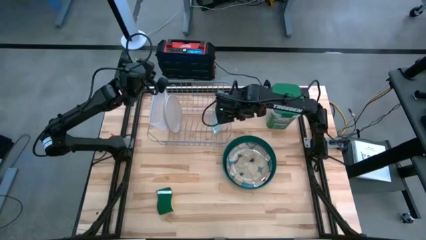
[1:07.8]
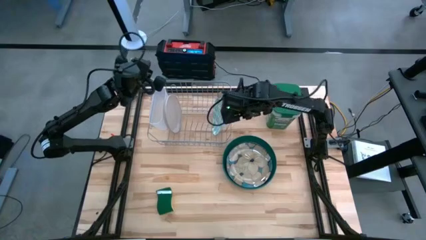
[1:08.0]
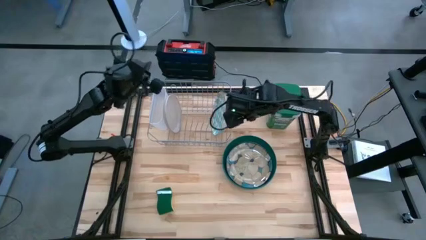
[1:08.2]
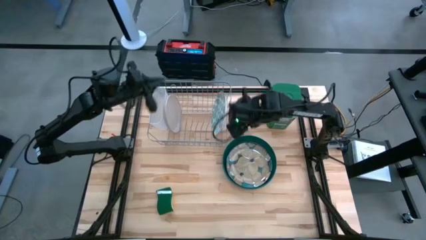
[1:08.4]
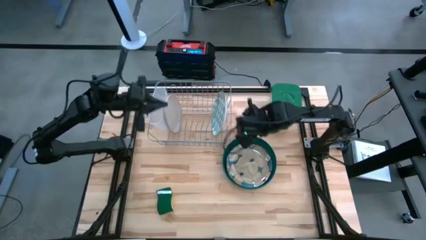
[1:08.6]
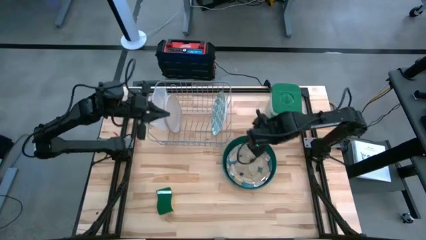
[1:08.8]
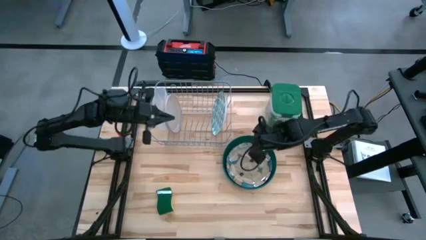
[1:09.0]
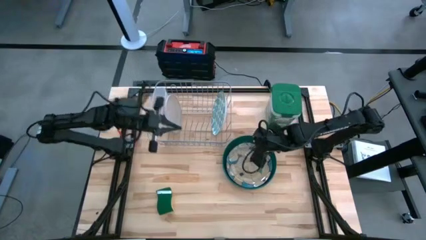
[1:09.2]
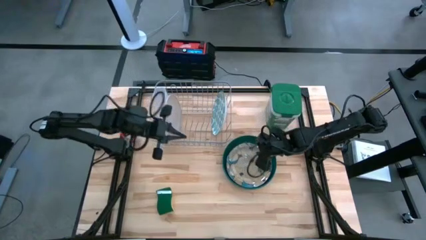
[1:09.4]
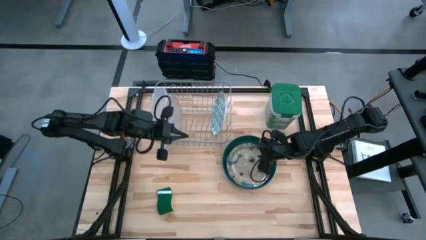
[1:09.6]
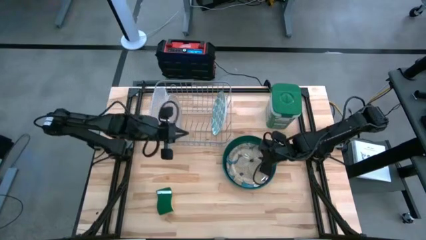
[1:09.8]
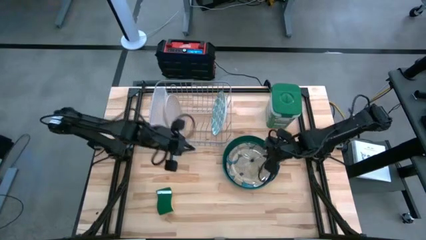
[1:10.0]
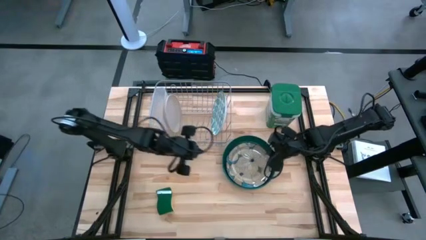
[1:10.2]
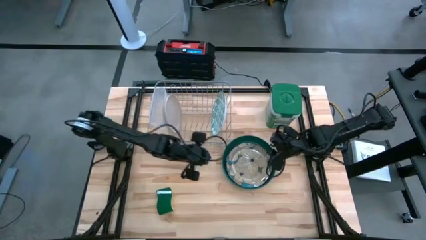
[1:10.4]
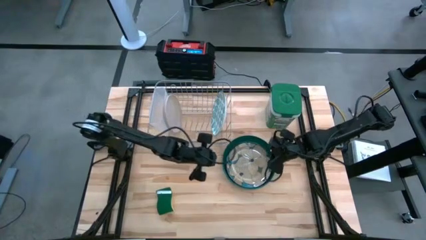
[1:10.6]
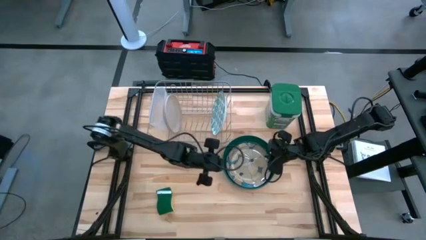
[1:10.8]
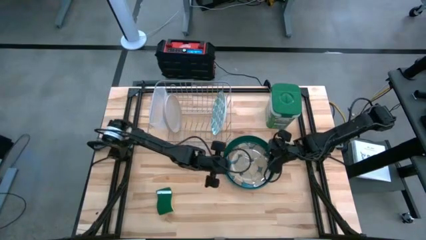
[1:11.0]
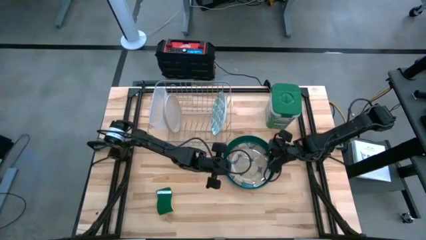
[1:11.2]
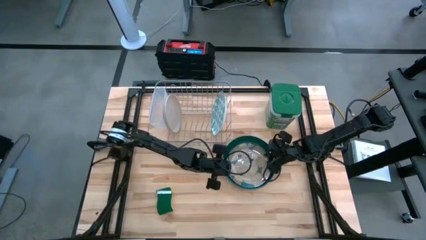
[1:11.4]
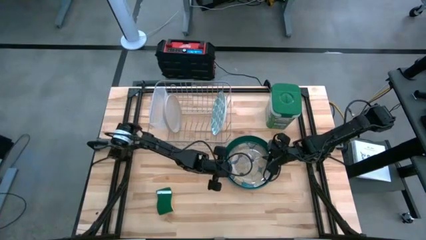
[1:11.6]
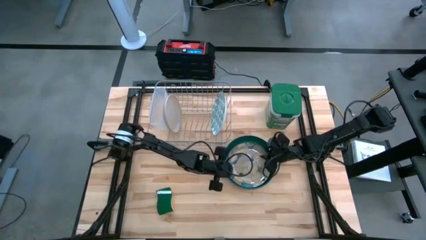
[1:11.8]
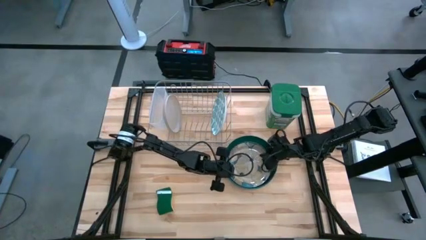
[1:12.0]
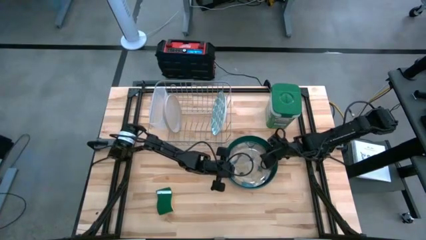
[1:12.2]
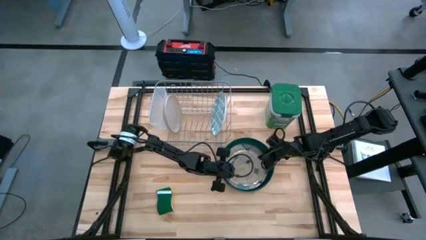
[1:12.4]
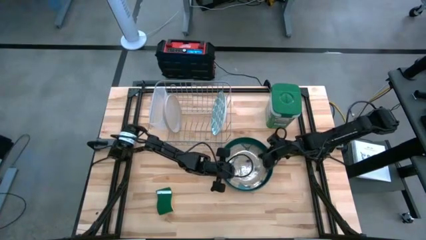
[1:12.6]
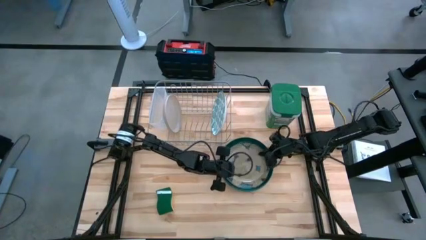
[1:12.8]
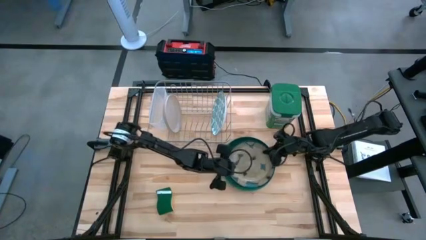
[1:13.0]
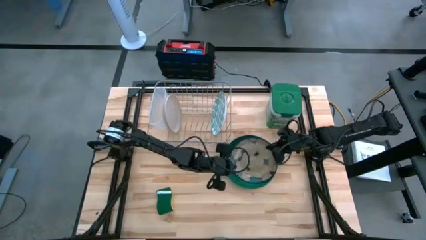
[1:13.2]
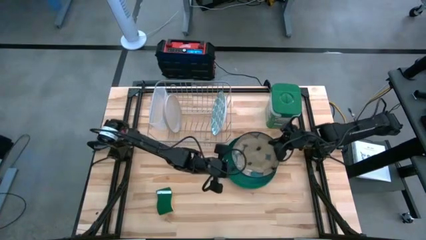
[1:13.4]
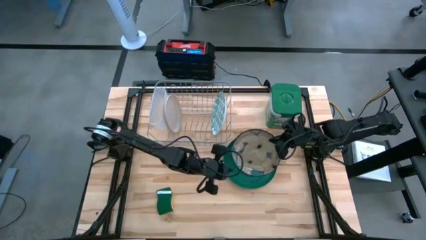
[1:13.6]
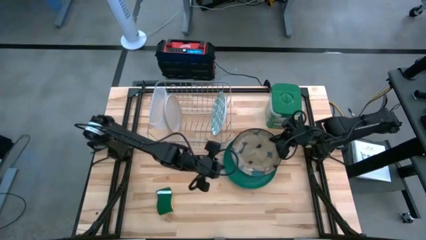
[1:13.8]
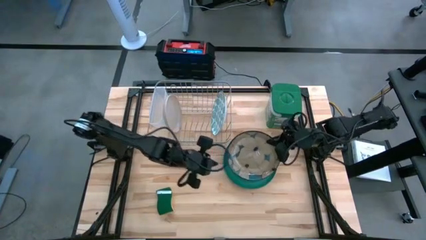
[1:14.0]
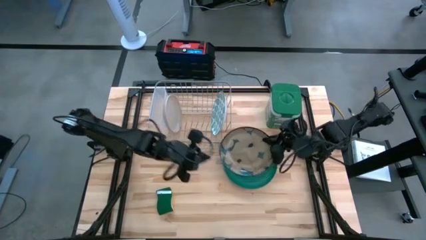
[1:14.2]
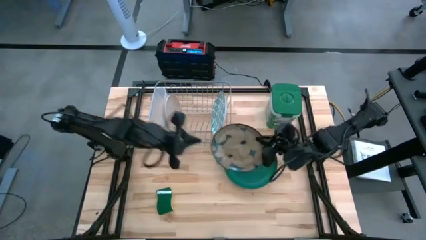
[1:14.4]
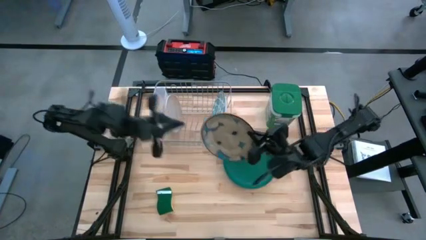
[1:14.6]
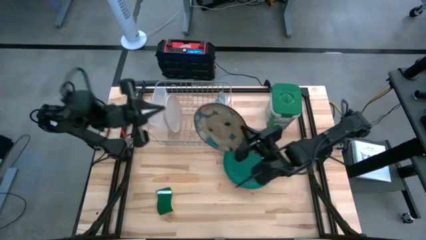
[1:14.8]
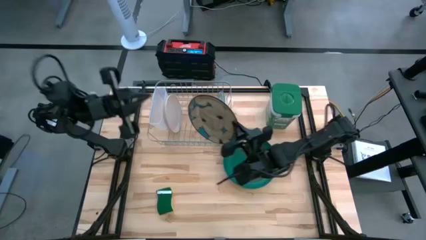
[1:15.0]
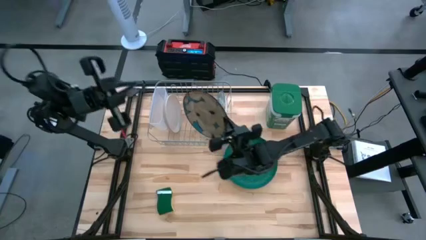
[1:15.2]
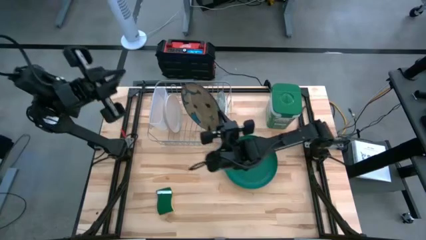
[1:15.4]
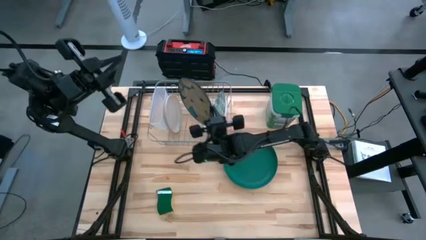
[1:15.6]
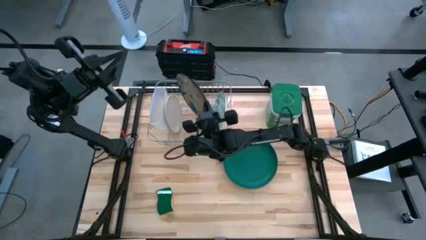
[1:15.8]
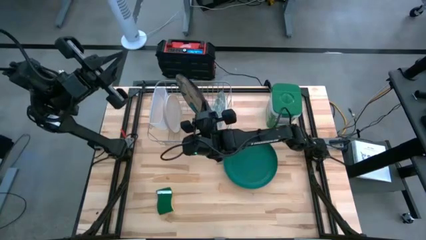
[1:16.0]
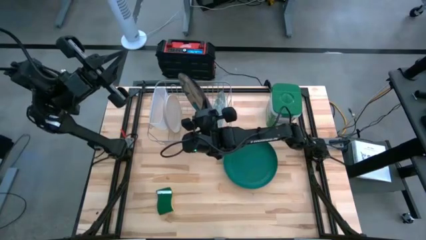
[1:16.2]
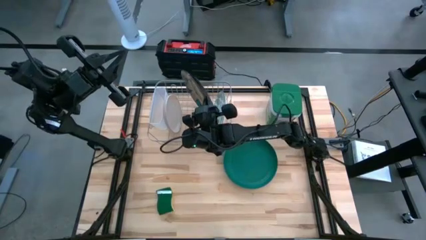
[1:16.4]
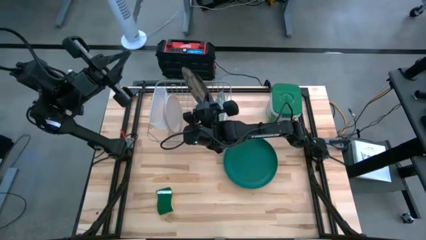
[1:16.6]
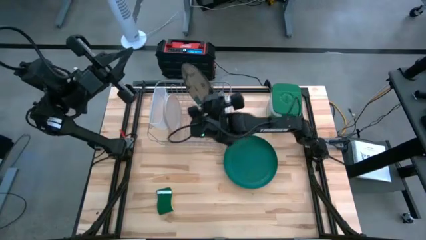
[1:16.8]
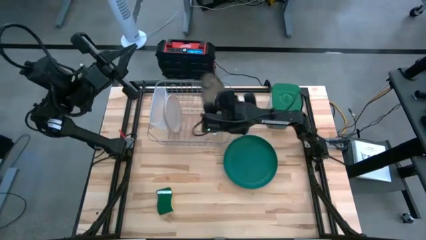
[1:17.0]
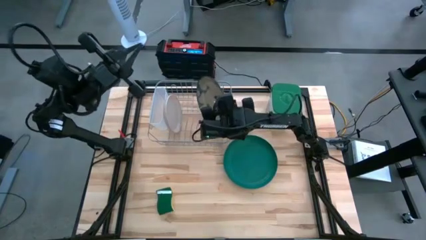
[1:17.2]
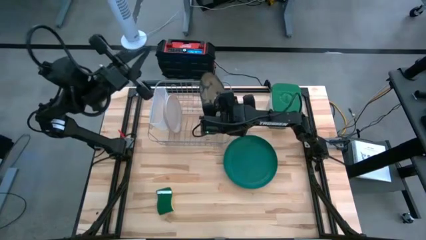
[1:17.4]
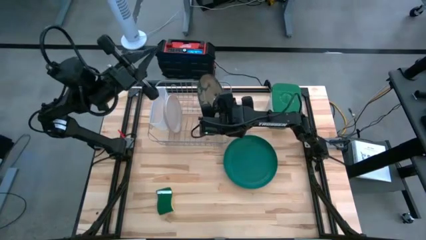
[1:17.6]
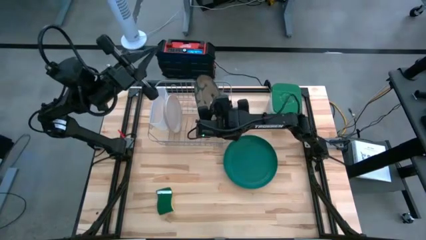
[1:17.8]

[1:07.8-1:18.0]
Task: Sort dishes
Put the white patterned plate on the dish rack

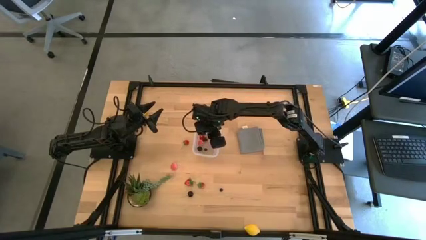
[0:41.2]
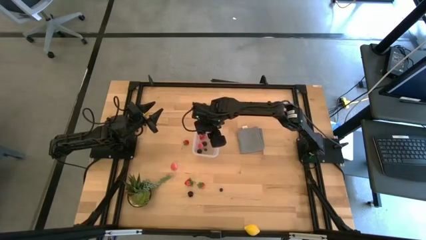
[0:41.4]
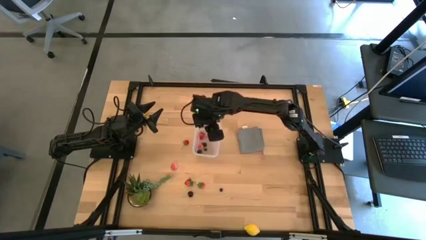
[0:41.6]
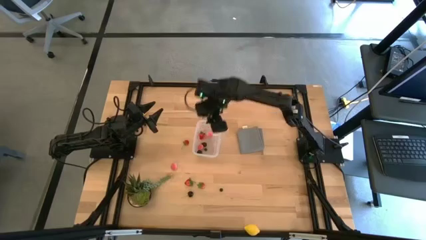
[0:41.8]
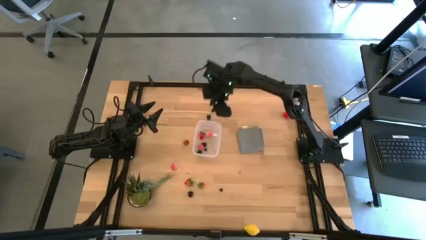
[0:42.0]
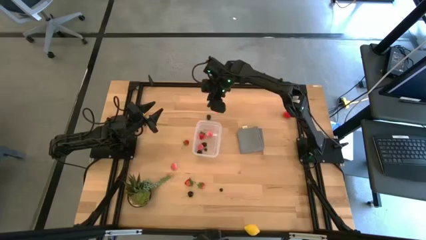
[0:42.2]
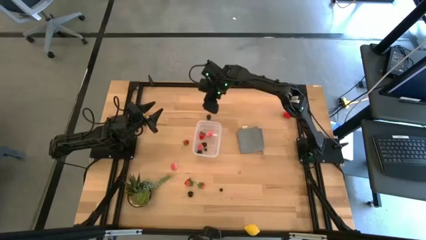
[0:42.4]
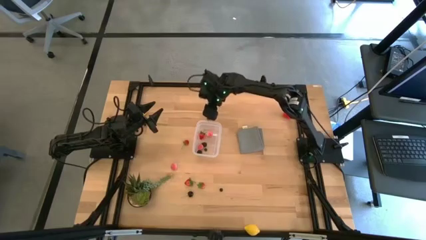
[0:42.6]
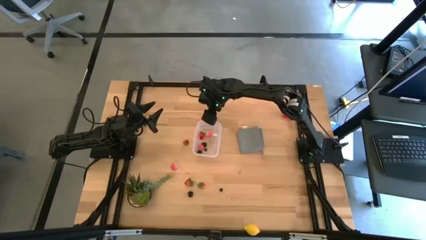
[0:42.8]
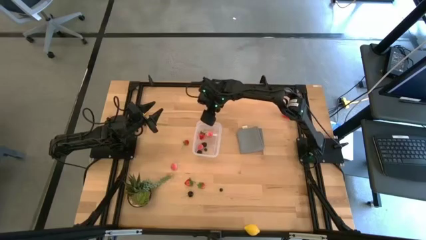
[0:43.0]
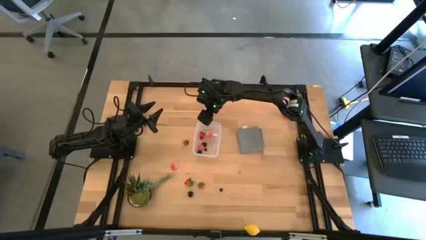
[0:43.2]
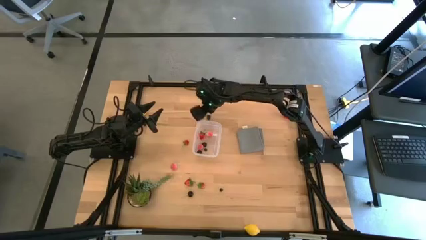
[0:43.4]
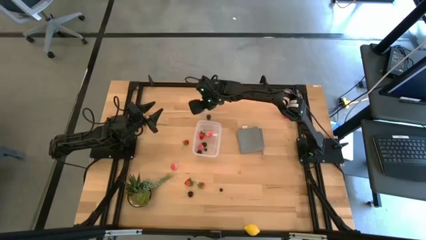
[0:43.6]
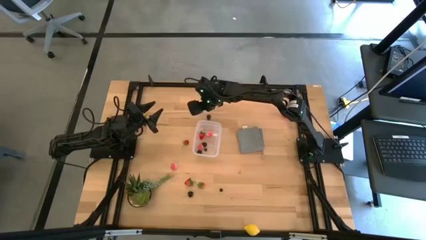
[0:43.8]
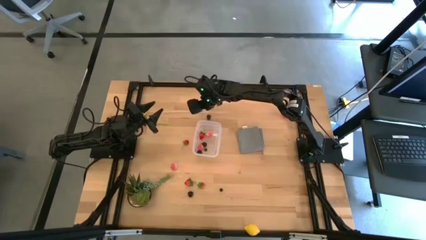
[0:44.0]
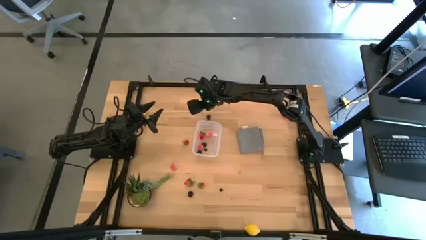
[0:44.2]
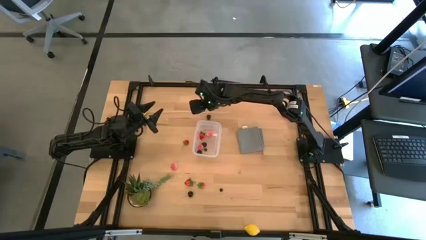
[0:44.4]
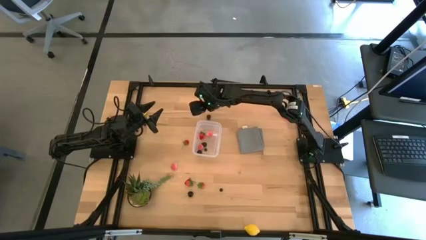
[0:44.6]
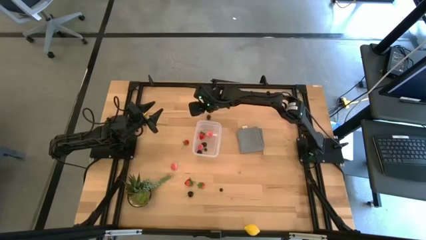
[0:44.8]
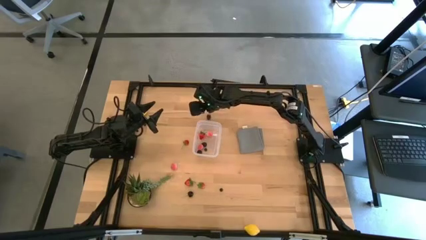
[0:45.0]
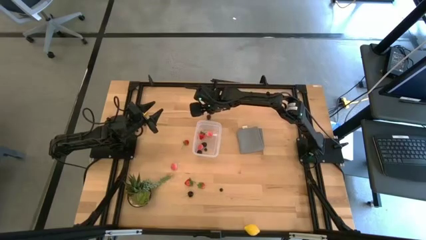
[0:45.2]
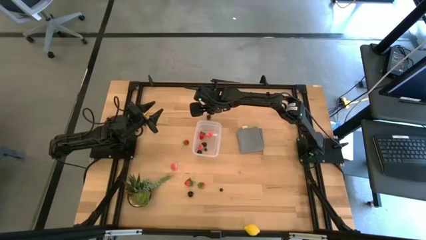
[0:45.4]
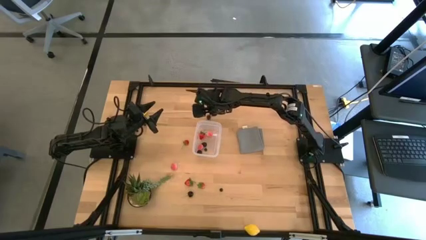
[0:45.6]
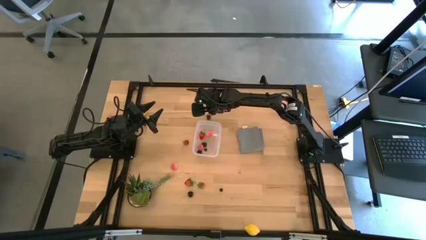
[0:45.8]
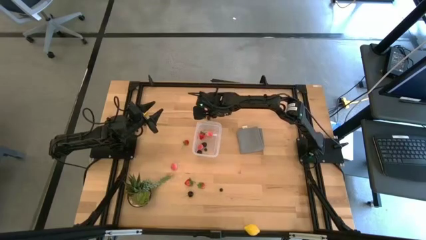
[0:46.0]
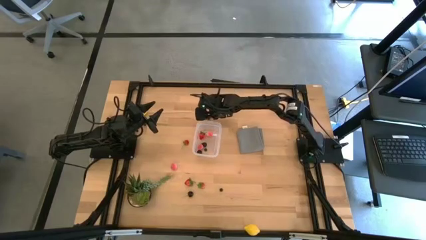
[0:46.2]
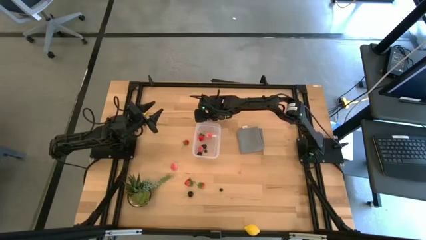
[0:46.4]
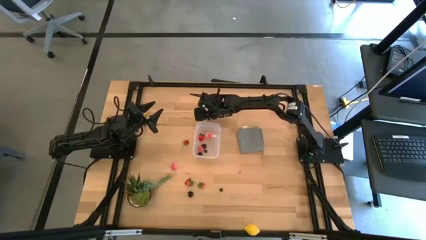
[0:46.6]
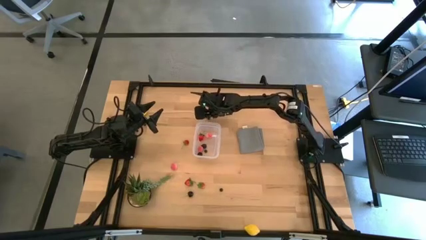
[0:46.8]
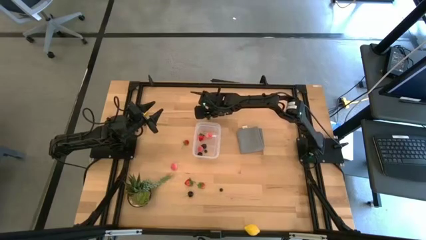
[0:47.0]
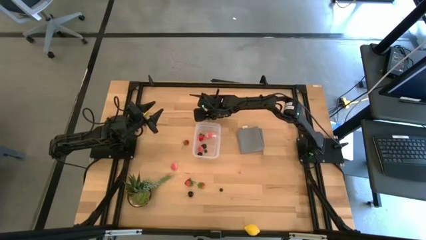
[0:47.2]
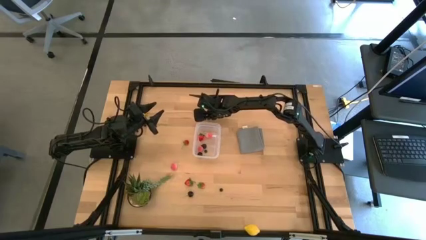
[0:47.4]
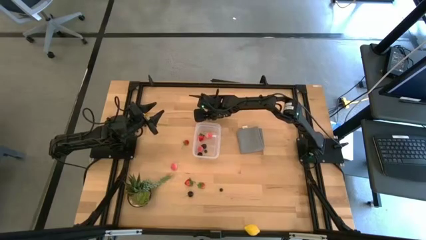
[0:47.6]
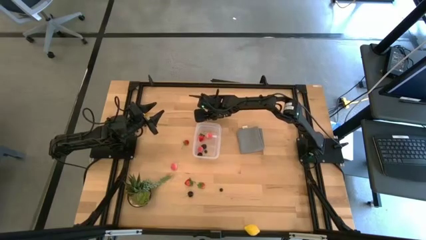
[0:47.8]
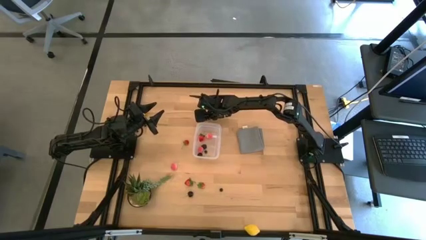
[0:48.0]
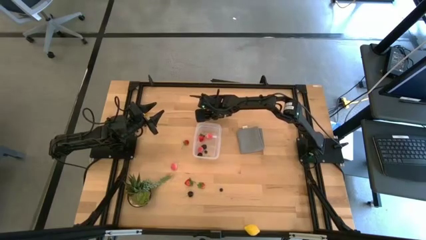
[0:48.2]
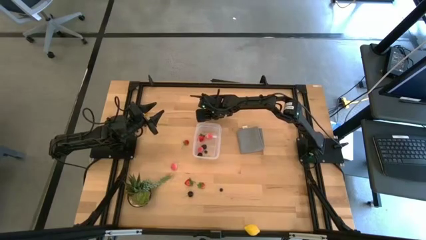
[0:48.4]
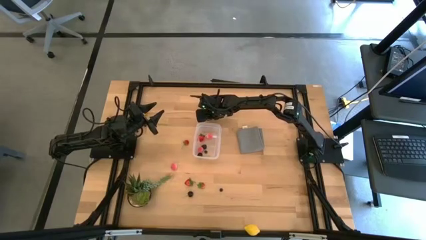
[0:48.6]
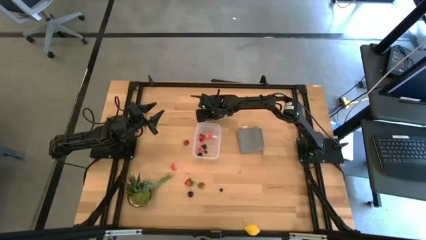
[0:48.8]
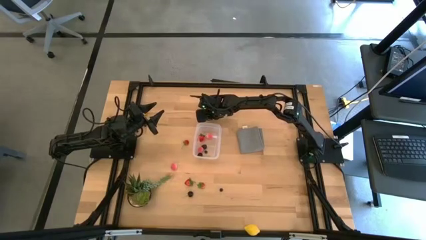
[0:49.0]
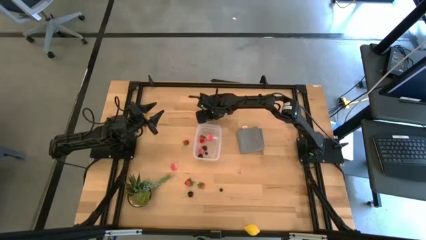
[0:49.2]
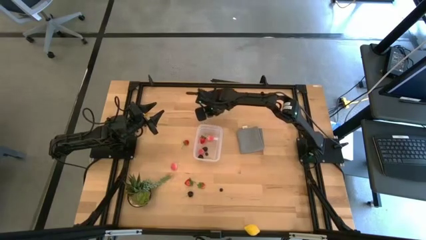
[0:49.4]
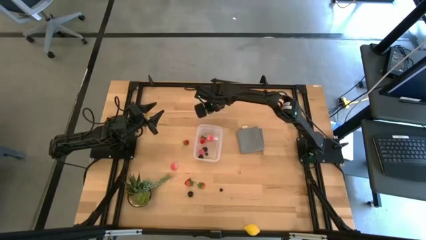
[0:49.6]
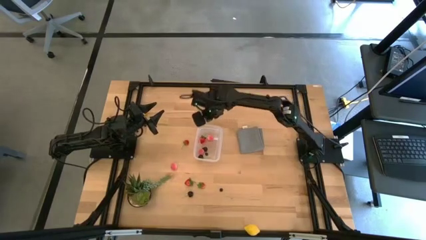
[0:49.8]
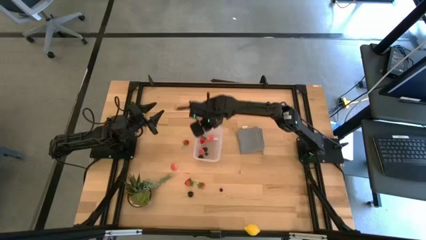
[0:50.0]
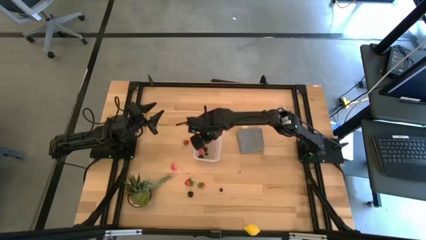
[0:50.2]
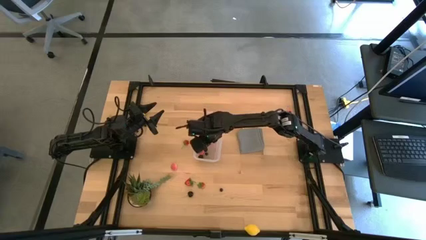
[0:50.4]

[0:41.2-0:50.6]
Task: Pick and placing Produce into tupperware
Put the blackberry into the transparent bin
